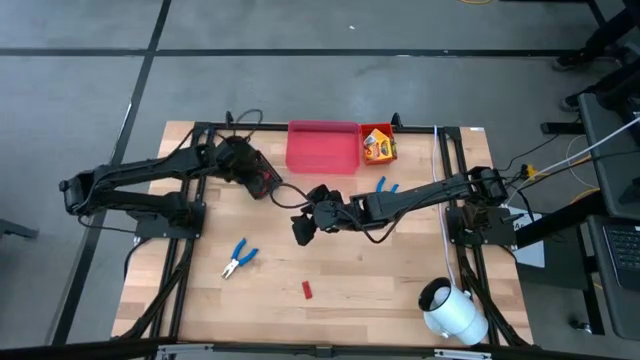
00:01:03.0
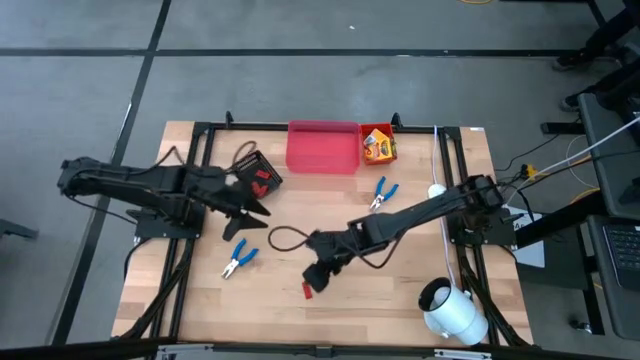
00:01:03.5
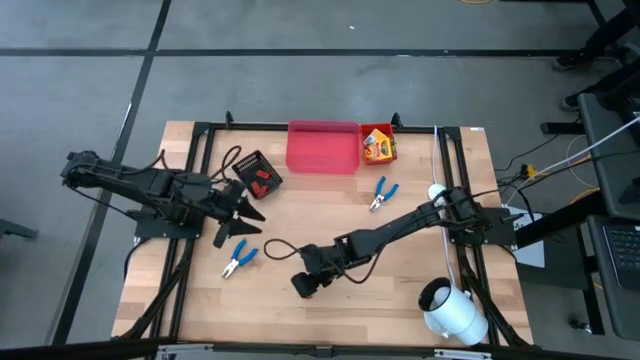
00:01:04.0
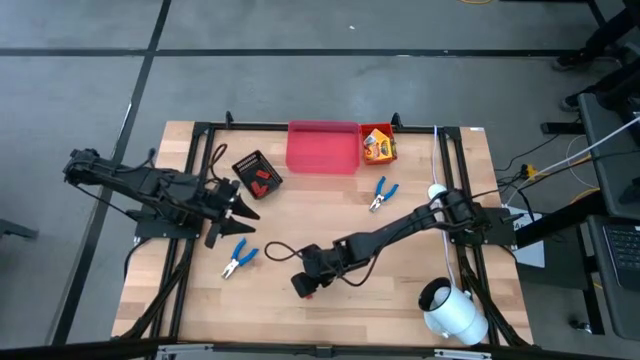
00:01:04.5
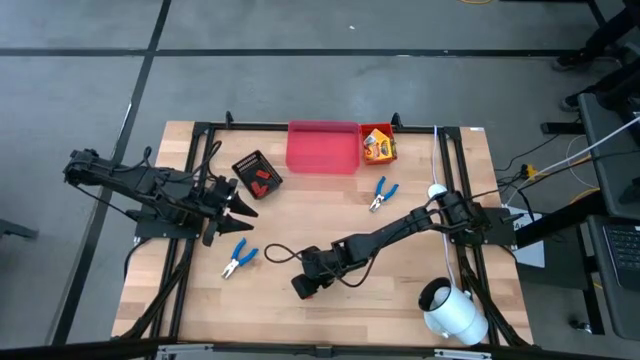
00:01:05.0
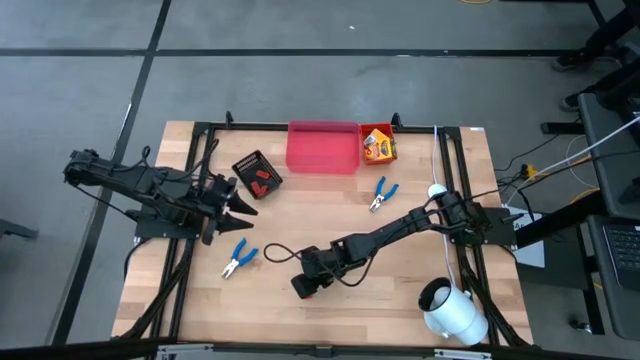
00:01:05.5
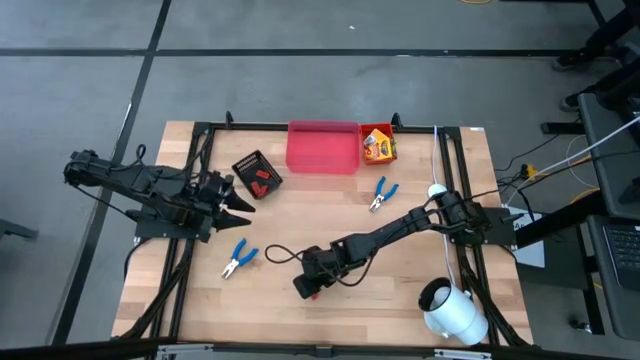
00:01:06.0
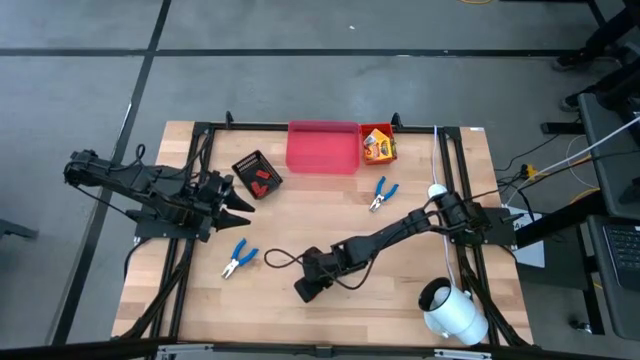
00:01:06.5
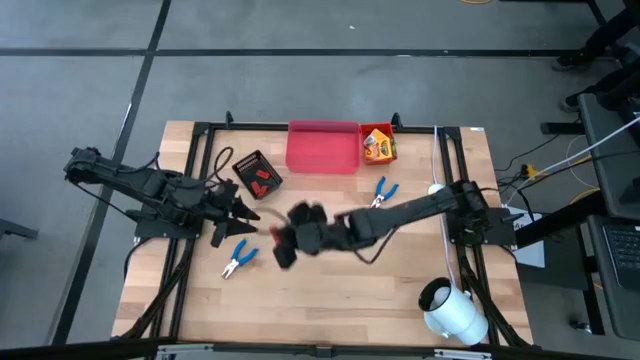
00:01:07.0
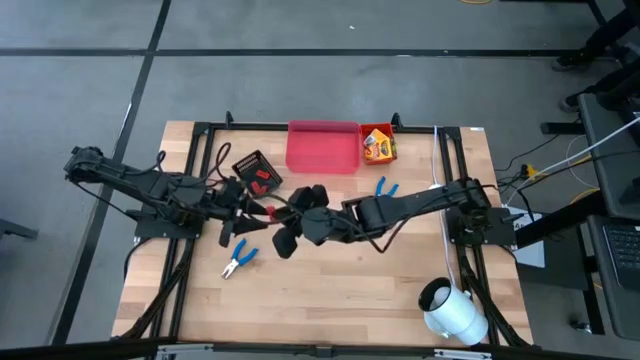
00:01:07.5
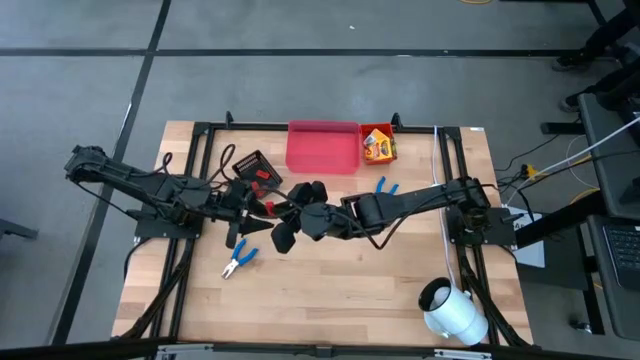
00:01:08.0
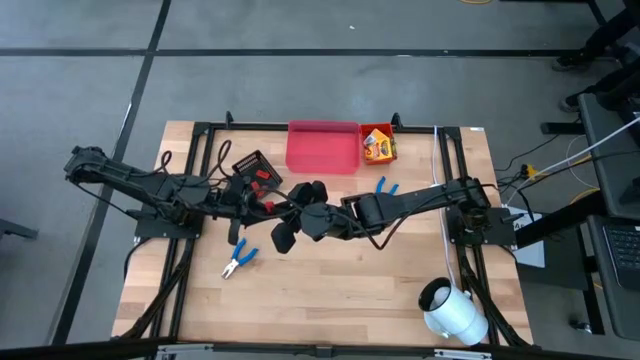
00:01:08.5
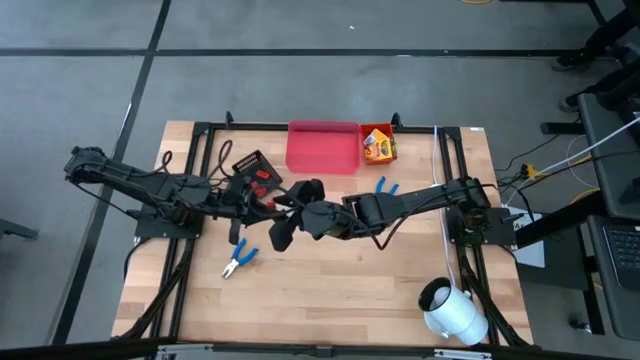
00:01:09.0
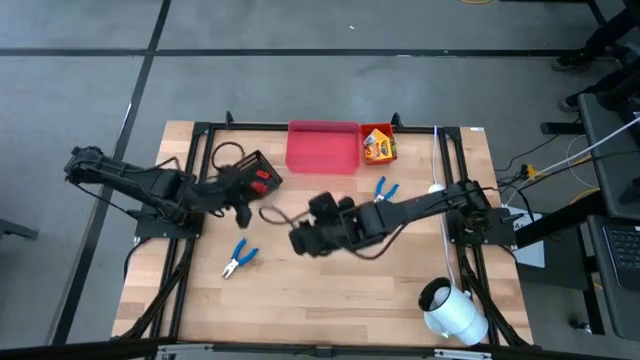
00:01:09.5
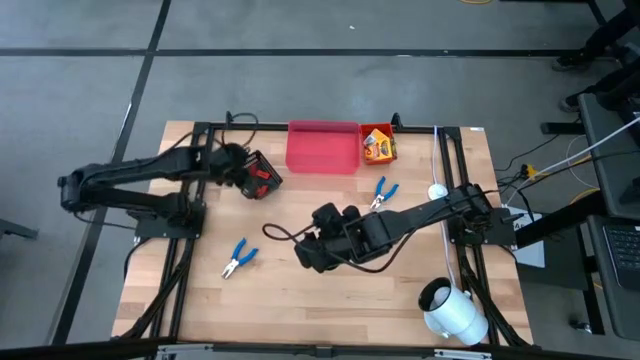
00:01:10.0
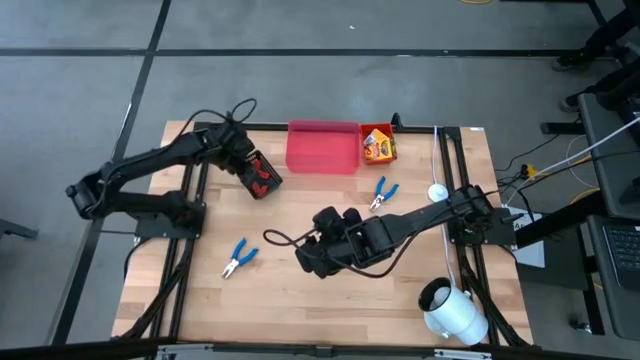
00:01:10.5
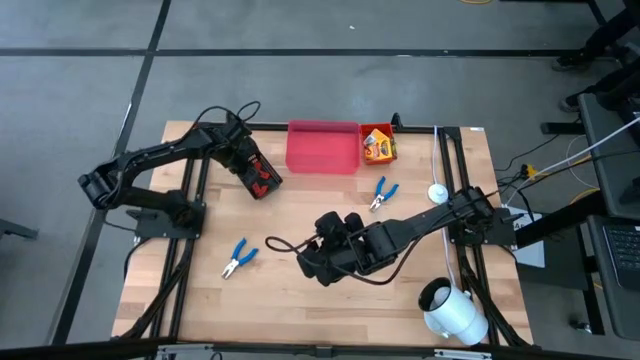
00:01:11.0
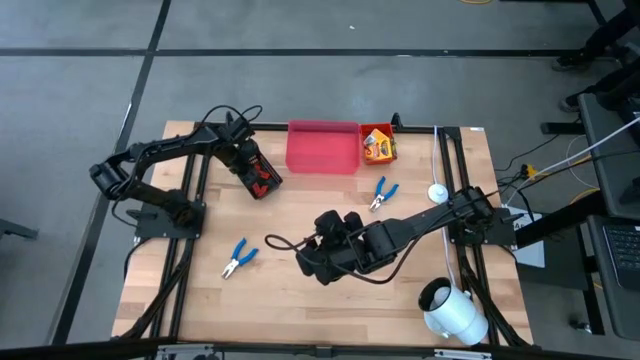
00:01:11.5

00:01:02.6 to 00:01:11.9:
Task: Pick & Place School Supplies
Put the red eraser into the black bin

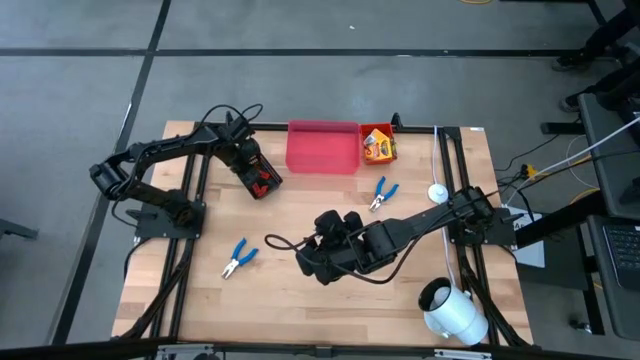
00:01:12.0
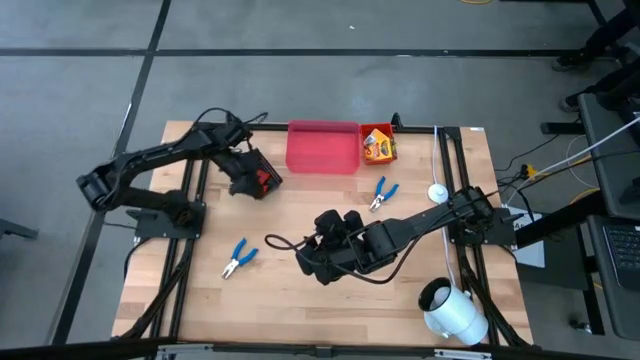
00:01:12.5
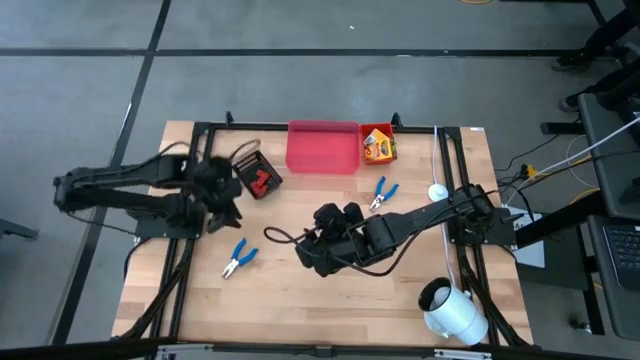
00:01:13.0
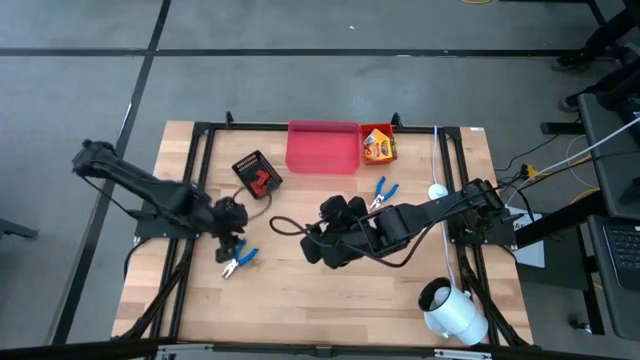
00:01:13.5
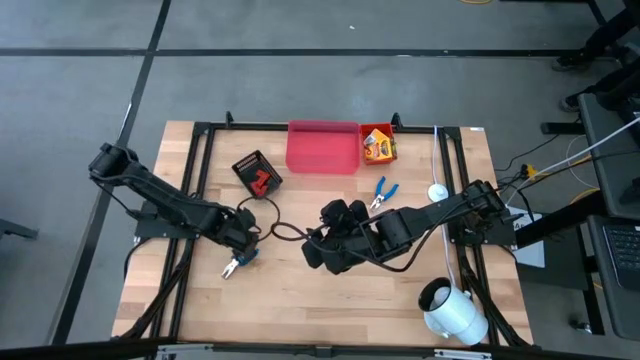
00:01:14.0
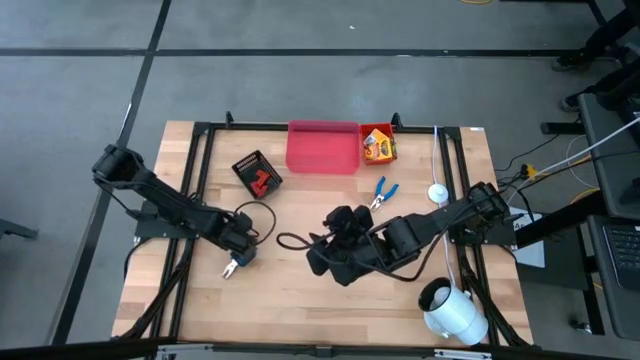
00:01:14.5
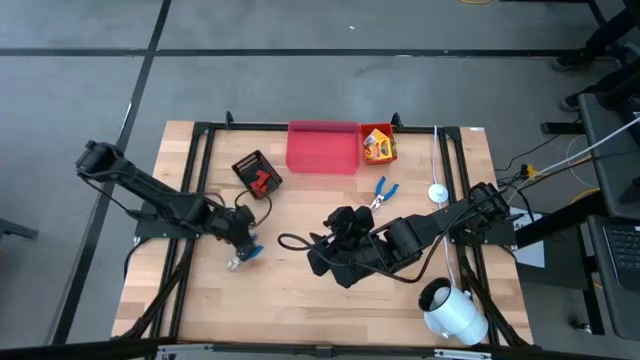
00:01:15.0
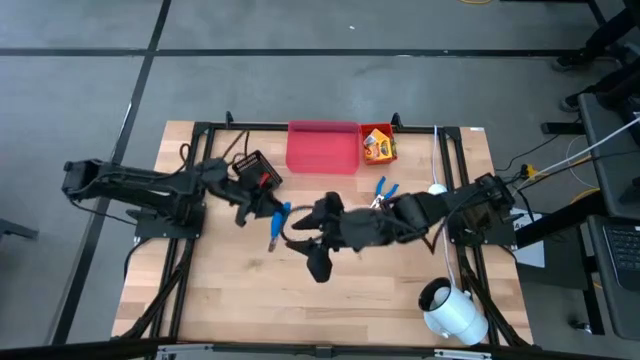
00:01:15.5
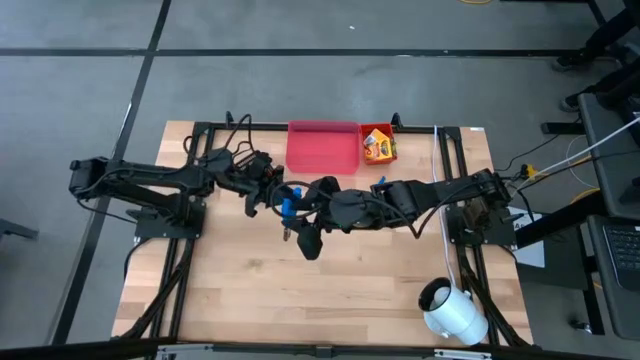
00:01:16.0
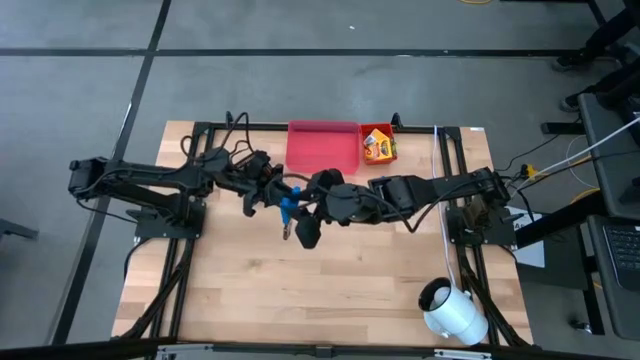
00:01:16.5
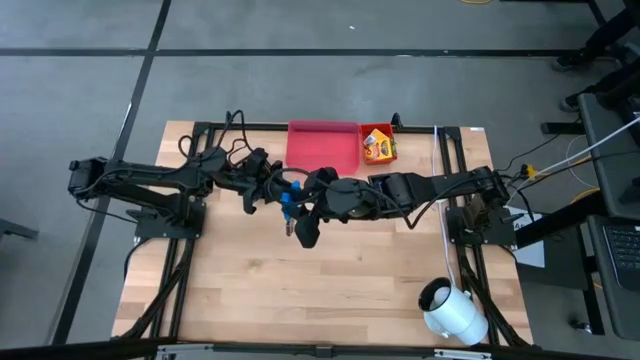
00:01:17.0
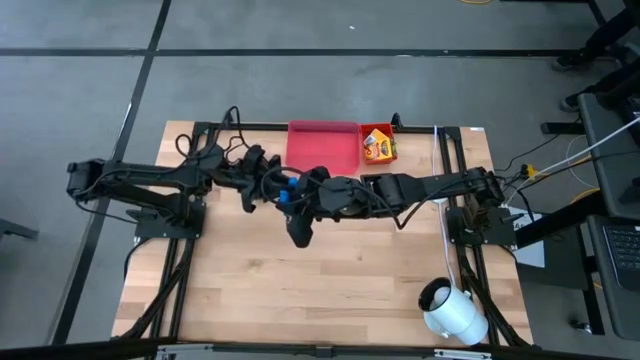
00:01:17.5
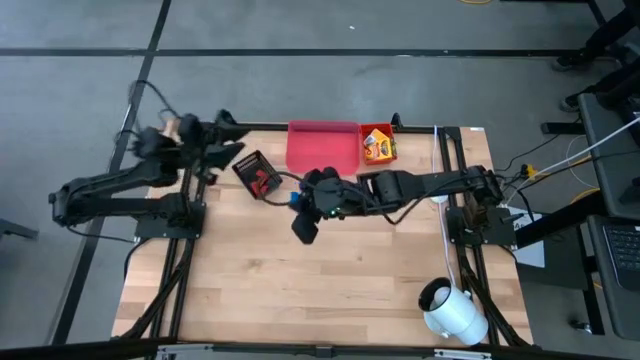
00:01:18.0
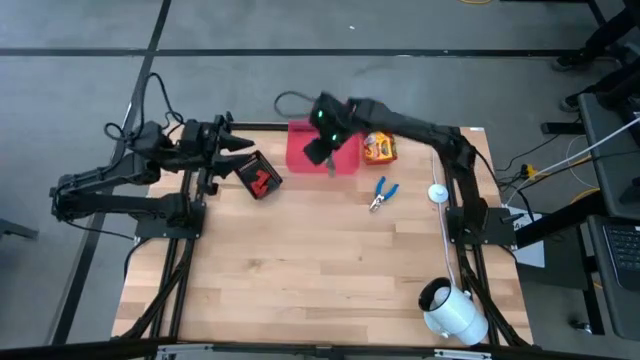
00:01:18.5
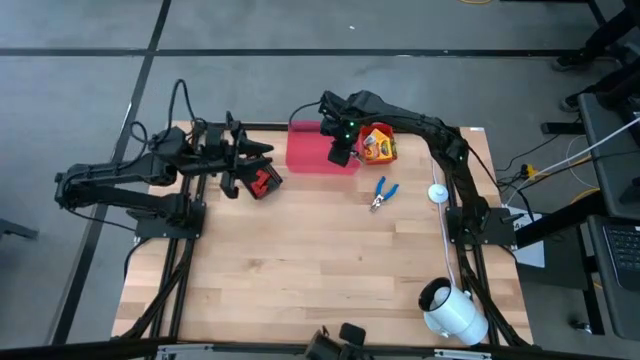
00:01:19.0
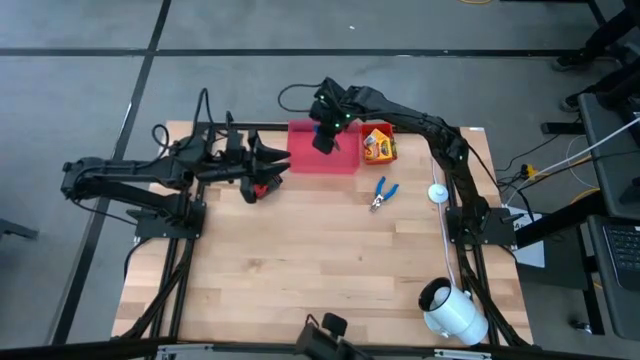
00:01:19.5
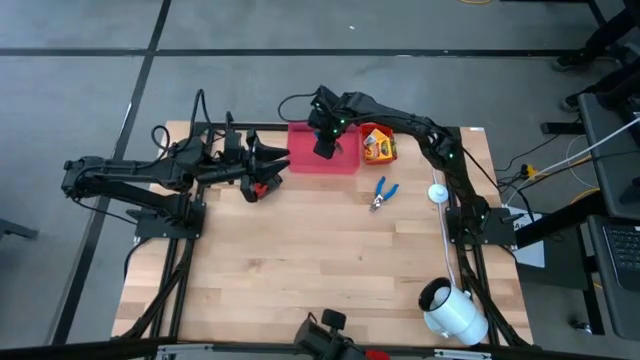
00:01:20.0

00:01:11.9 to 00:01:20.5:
Put the blue puncher into the pink bin

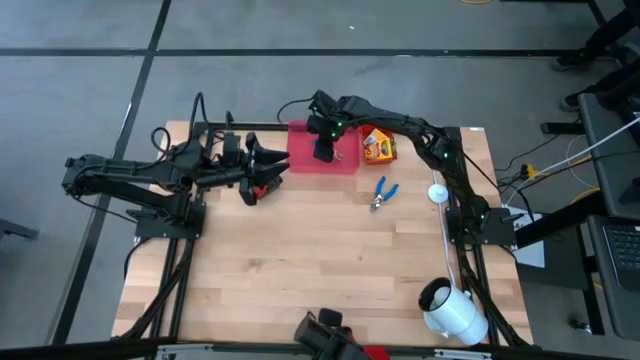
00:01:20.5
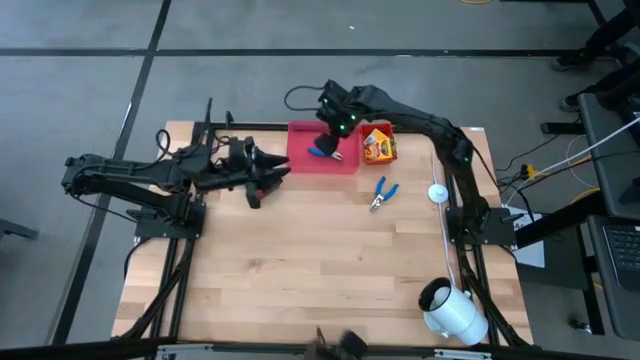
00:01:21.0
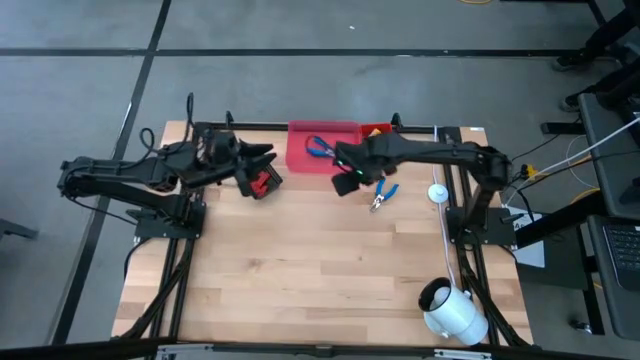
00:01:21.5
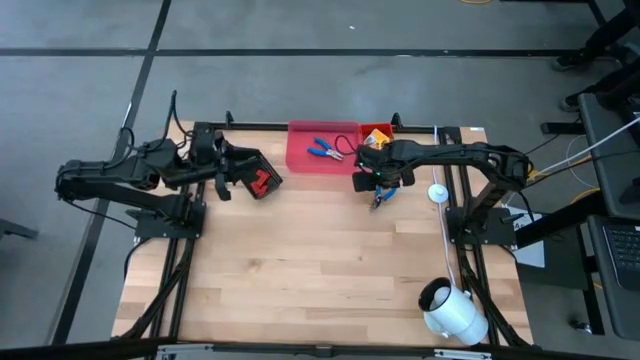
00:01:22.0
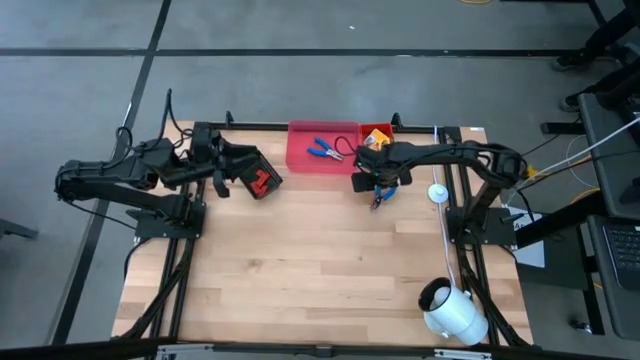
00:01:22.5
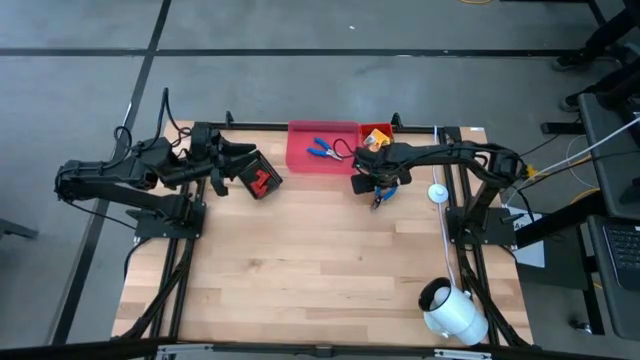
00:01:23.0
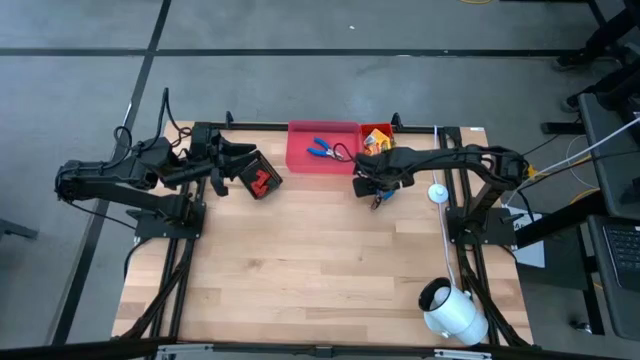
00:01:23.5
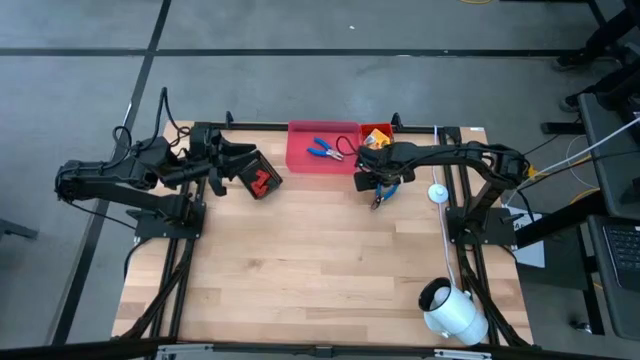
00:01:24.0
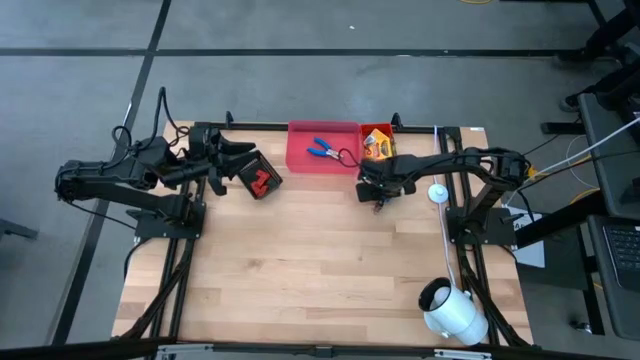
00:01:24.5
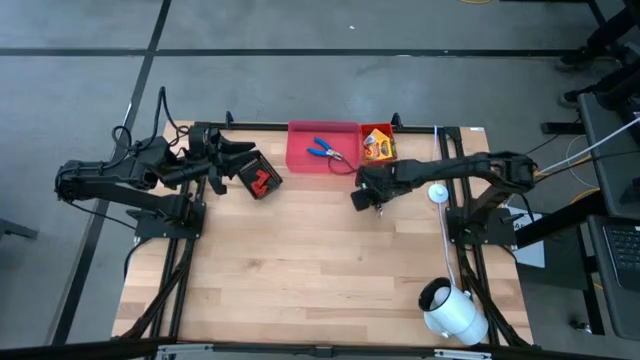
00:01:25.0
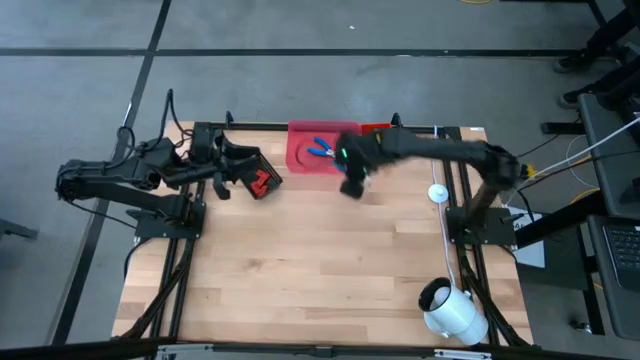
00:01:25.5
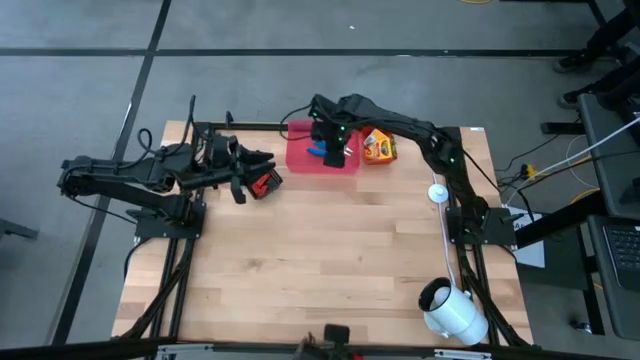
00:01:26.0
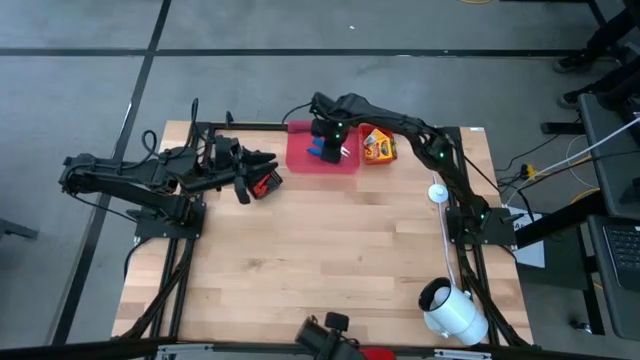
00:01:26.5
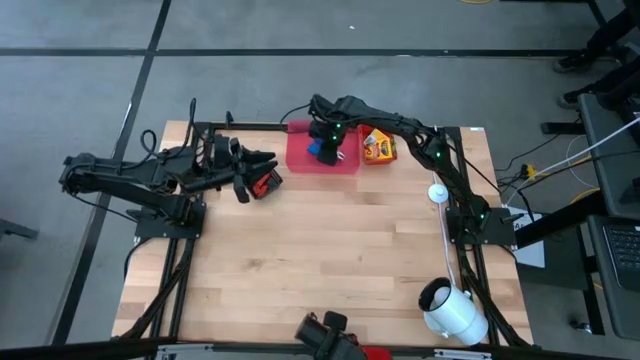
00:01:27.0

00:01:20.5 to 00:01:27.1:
Put the blue puncher into the pink bin
